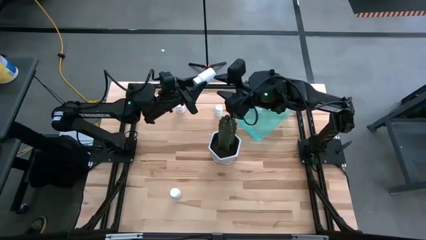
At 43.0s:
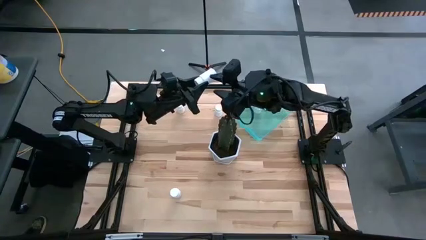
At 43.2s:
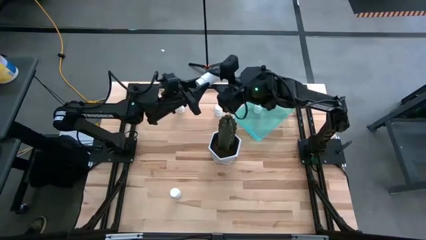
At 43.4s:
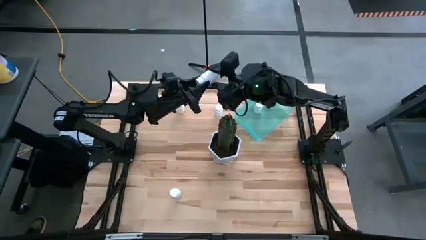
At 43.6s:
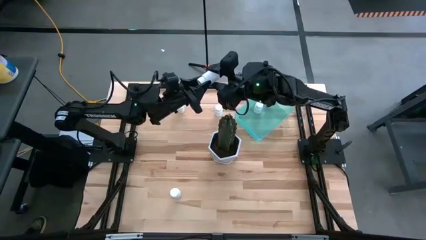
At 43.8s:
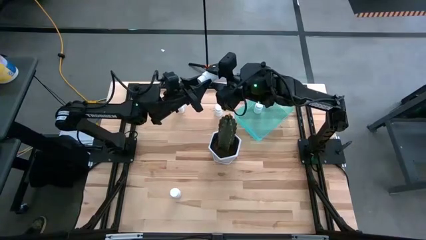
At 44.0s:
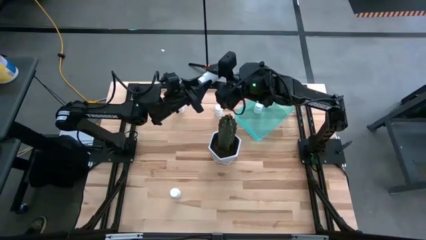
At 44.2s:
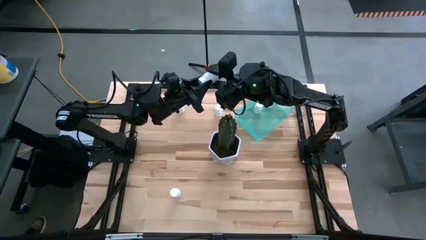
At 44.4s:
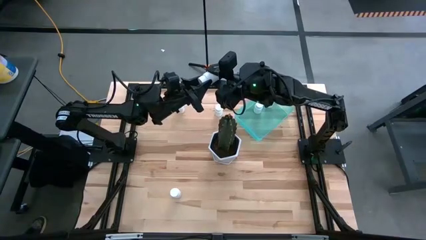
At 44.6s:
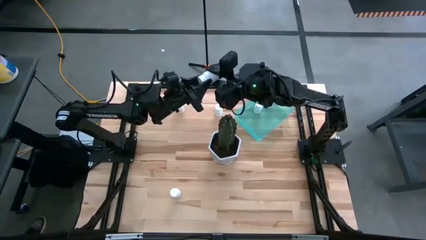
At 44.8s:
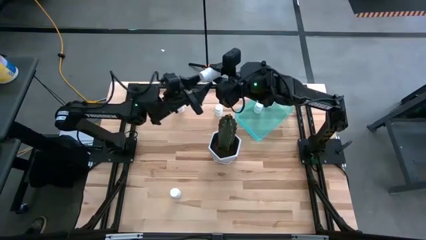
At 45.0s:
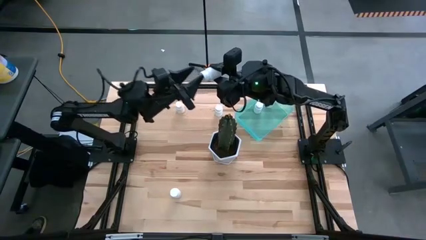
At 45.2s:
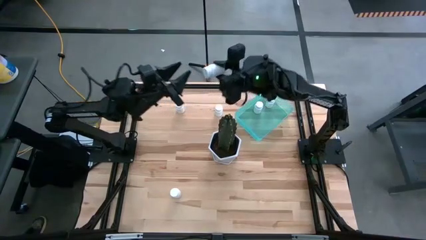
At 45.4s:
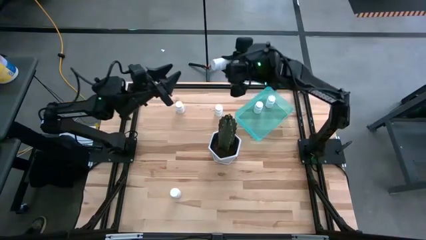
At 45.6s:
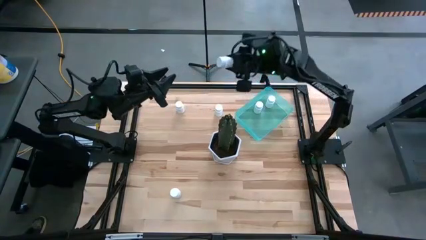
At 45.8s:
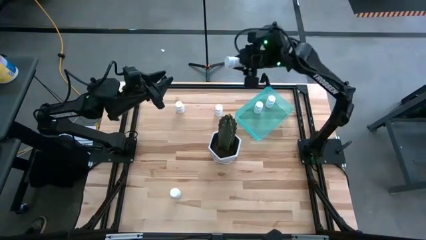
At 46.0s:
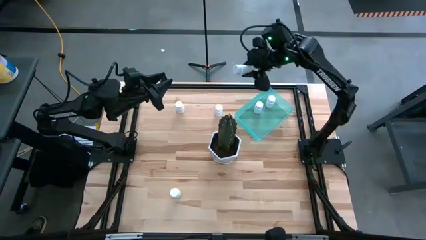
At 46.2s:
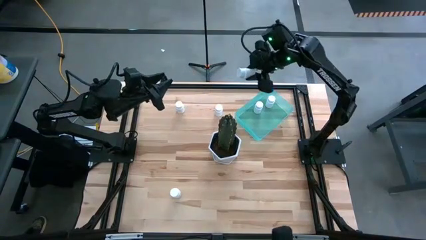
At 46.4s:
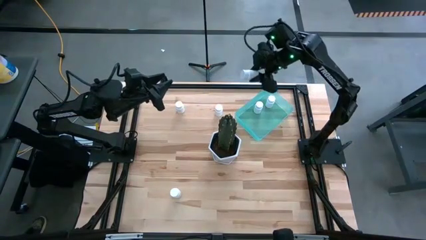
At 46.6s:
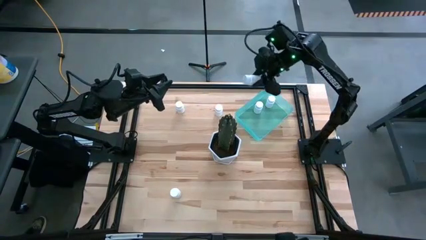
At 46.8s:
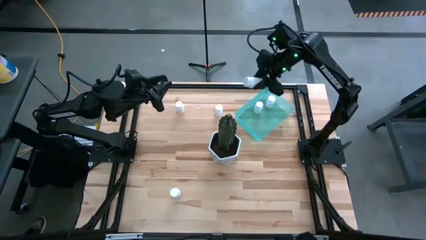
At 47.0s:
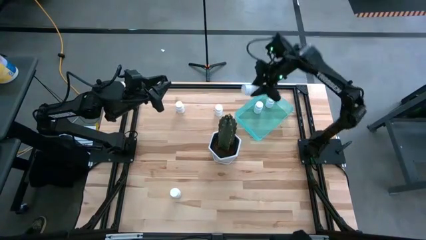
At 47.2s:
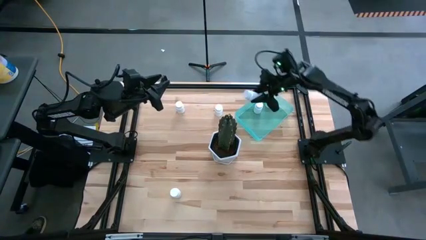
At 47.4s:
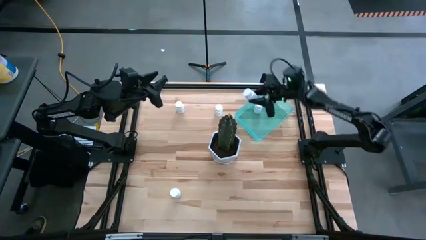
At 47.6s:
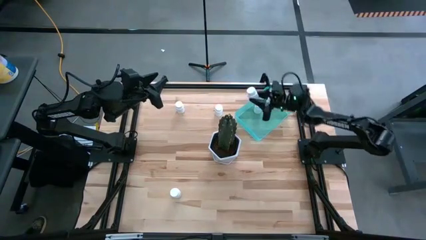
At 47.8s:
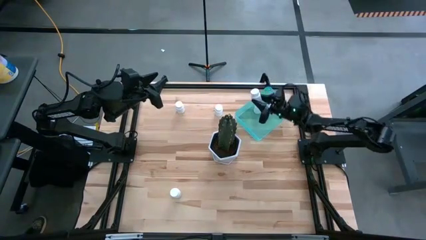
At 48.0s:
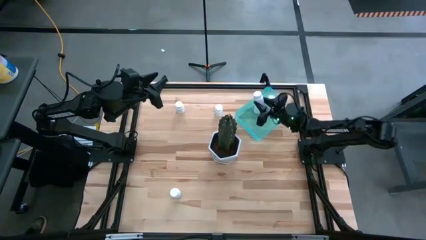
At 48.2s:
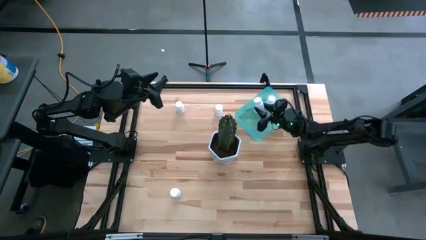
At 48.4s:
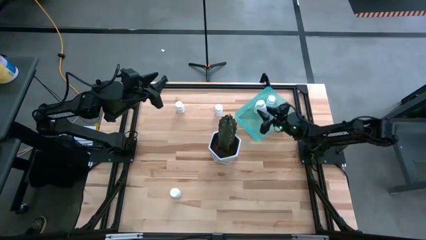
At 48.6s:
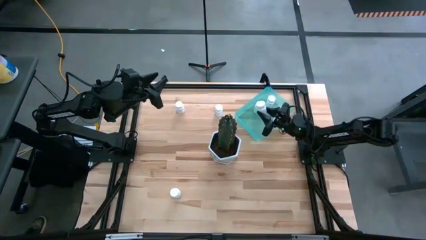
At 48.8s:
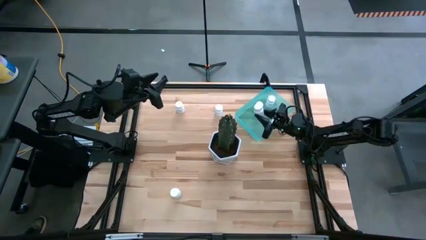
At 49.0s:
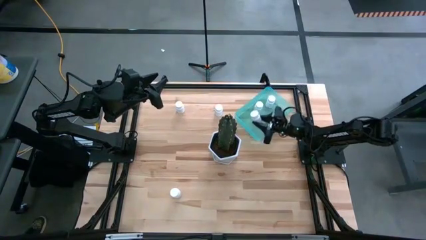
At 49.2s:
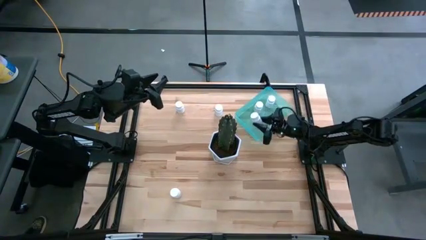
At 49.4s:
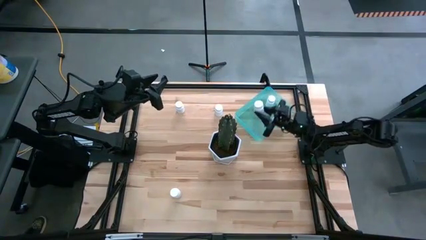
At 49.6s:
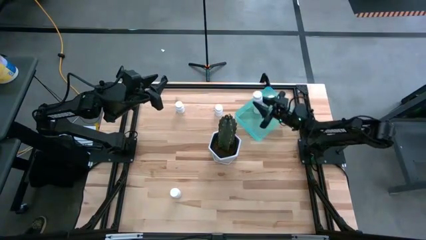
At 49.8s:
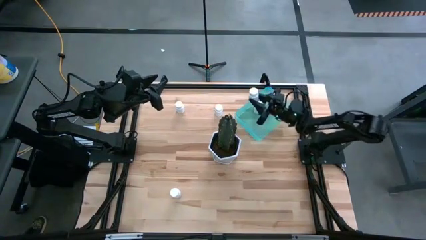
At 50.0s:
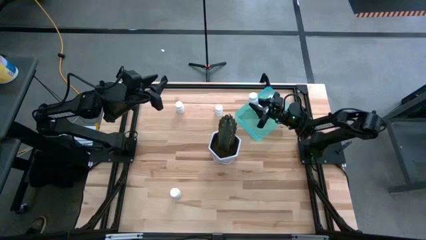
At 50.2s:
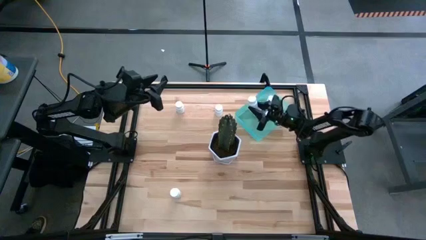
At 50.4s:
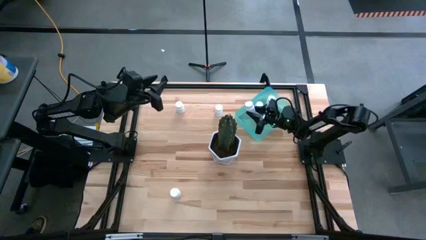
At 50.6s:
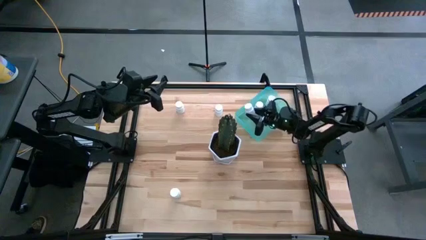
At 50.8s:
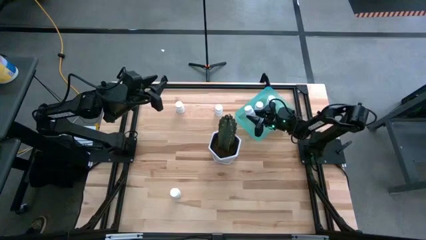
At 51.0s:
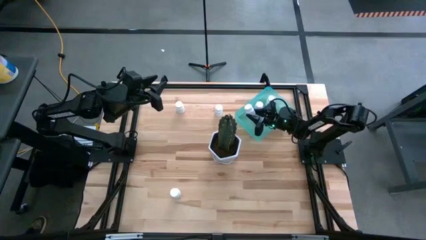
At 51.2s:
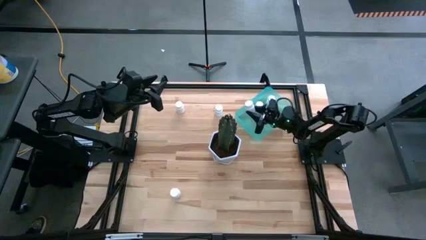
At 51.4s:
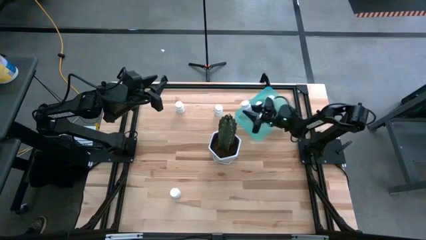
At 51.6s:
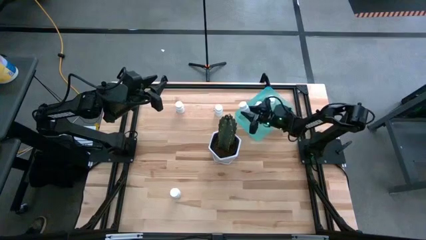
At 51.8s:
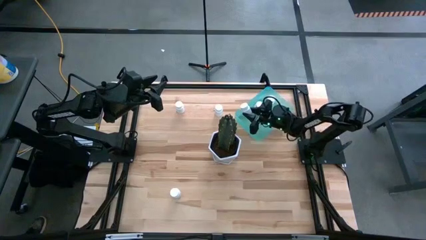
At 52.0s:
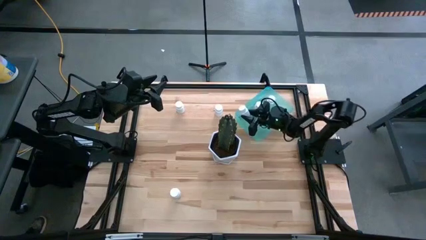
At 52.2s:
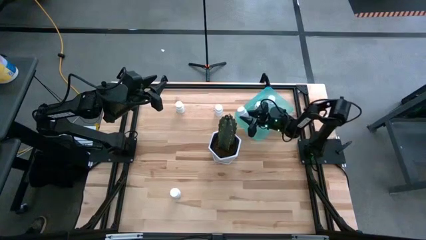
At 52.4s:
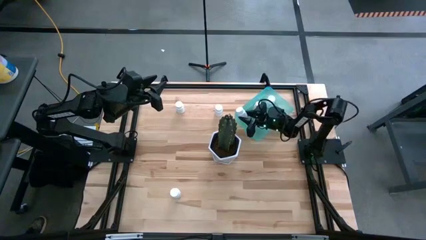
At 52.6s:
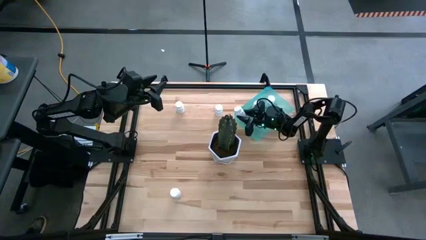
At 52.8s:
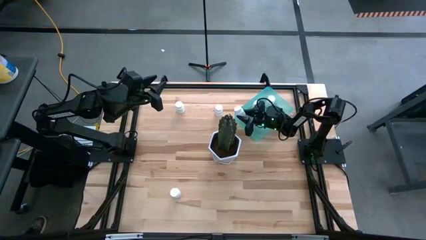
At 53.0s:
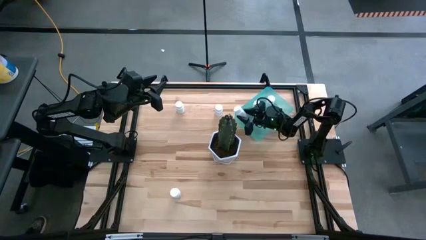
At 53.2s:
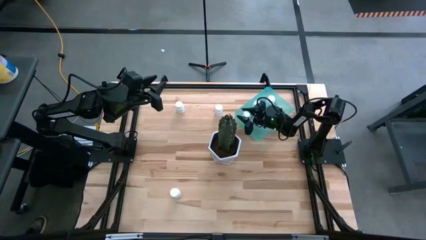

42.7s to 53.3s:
Task: Pick and place pill bottles into a basket
Put the white medicine bottle into the blue bin

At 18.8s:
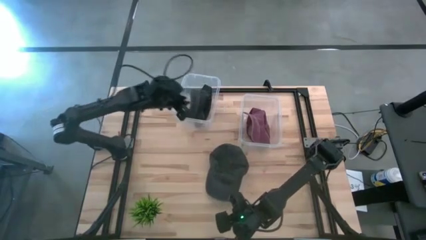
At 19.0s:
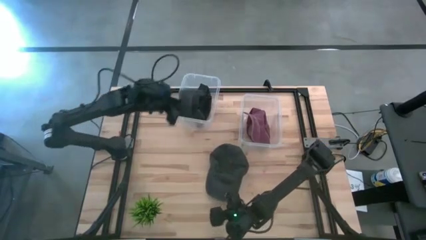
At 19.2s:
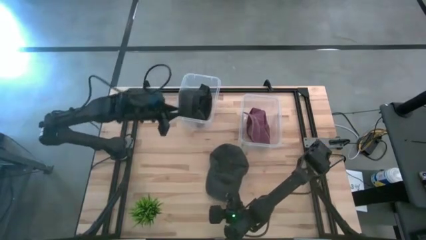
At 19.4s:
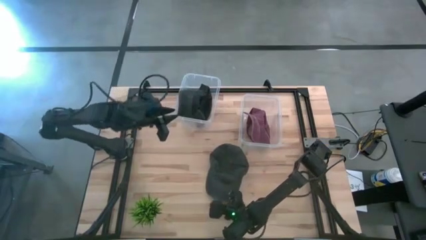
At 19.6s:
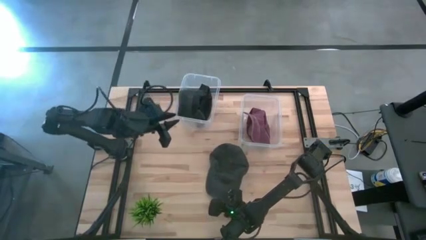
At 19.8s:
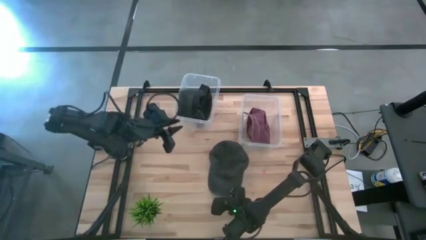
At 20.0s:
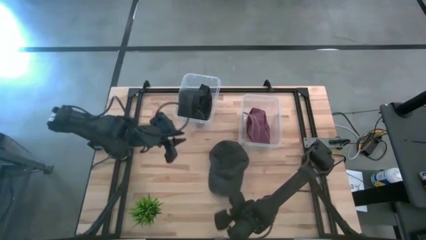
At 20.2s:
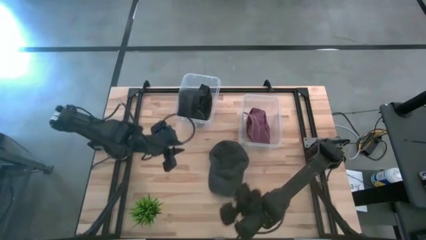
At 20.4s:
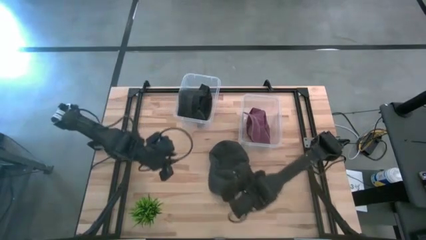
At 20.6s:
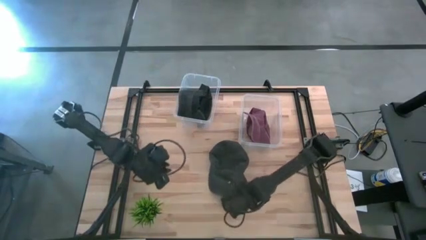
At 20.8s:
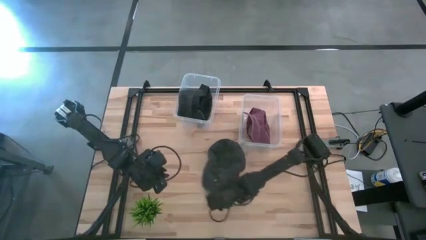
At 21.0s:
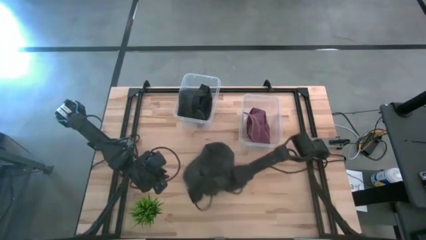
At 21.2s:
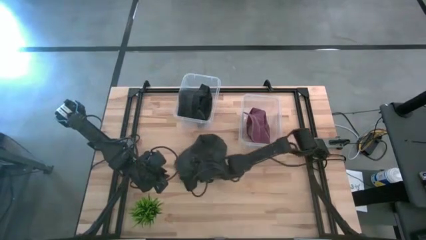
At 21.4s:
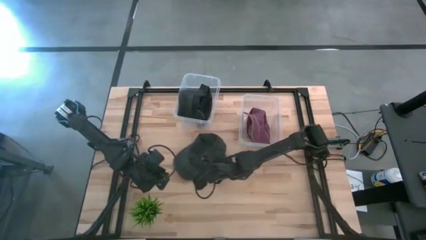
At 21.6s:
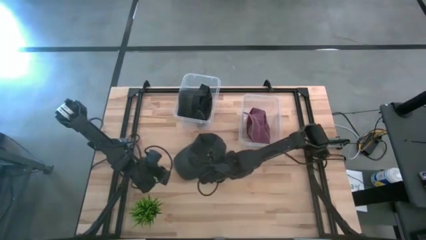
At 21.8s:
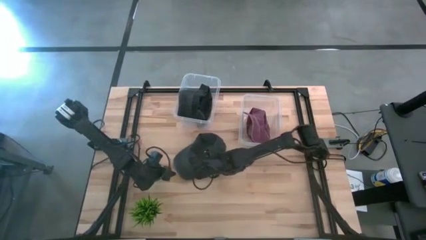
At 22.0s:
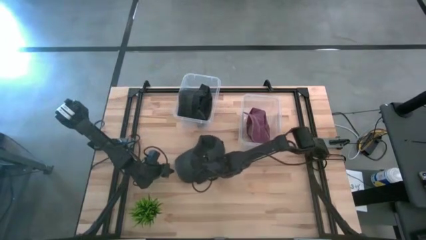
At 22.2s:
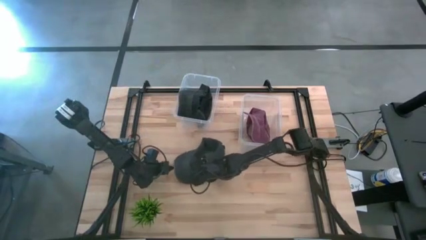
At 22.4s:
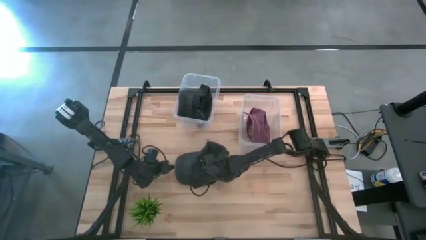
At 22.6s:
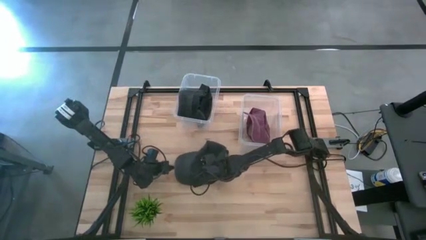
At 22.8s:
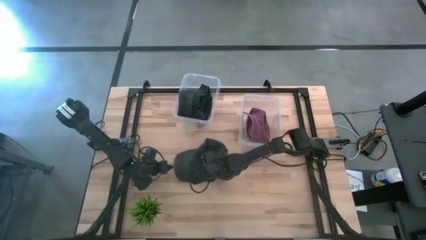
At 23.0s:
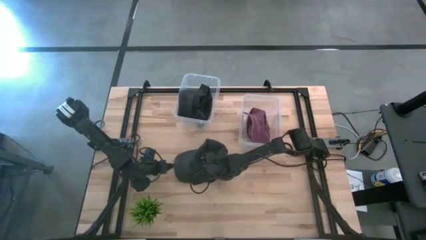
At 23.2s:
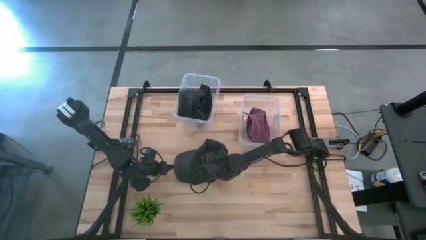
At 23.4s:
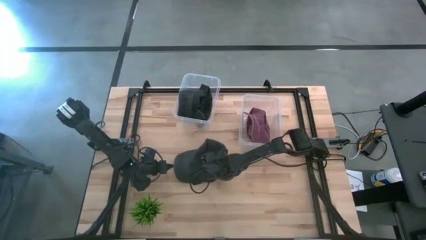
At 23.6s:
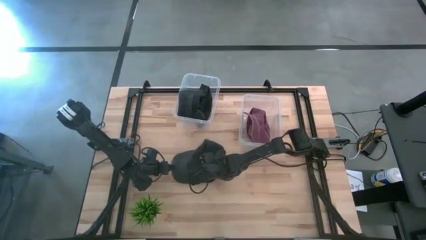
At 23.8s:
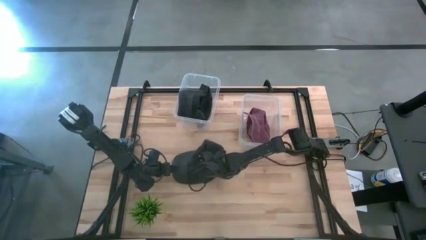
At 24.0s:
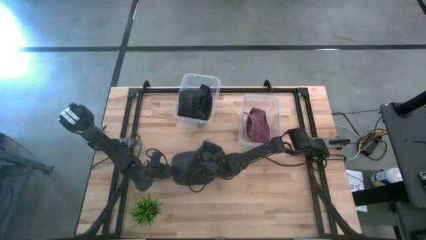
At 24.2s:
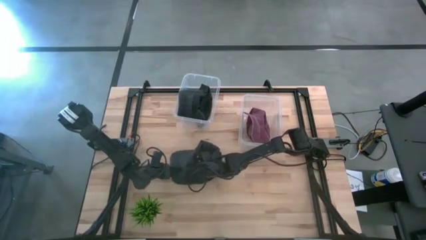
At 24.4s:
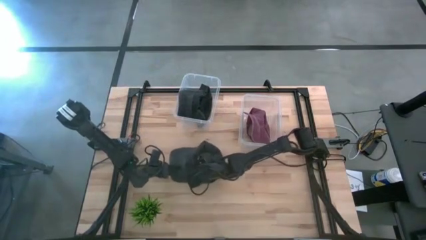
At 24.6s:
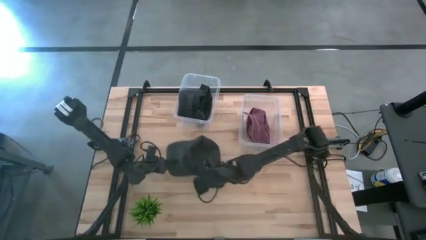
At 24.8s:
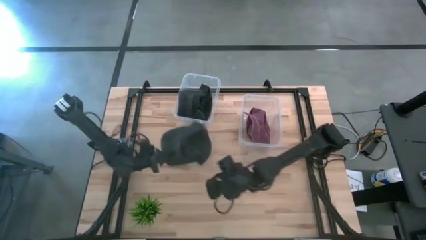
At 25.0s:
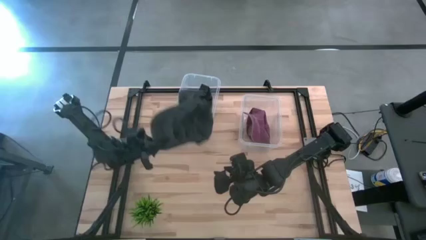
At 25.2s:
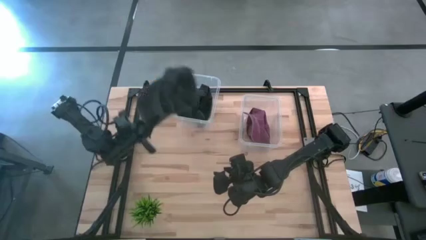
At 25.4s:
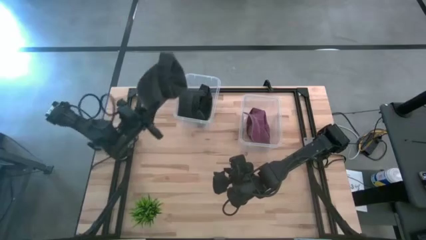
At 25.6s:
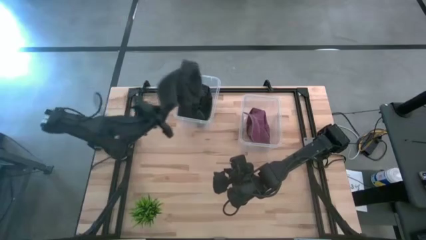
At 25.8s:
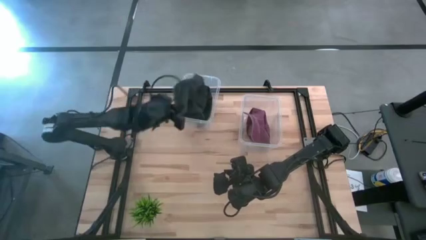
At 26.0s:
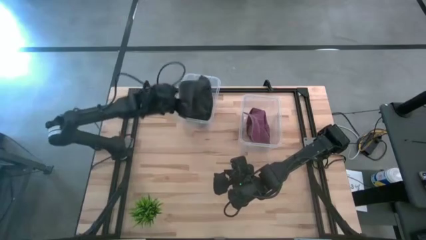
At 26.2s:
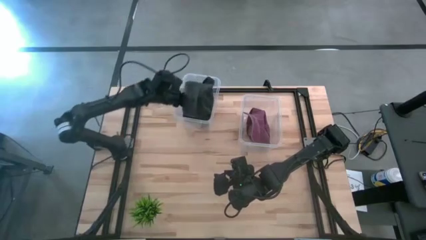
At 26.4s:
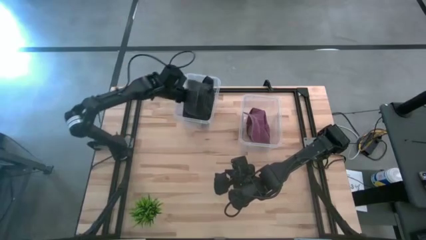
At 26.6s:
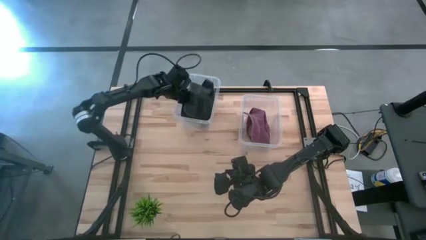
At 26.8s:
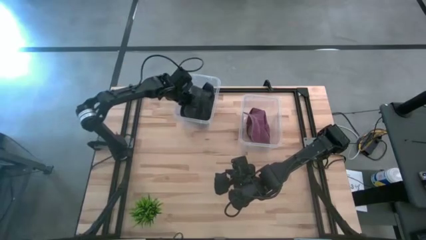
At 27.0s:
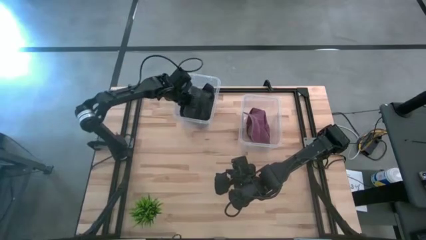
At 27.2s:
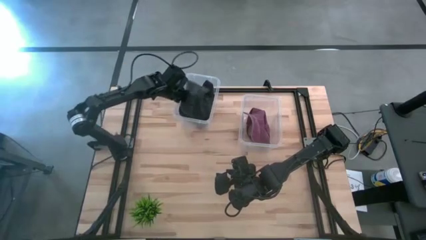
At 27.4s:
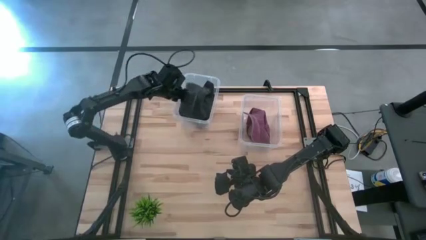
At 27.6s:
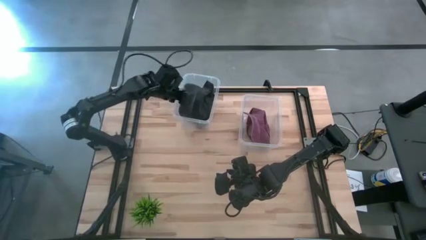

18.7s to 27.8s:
Task: Pick & Place hat
Put the black cap into the left transparent bin
